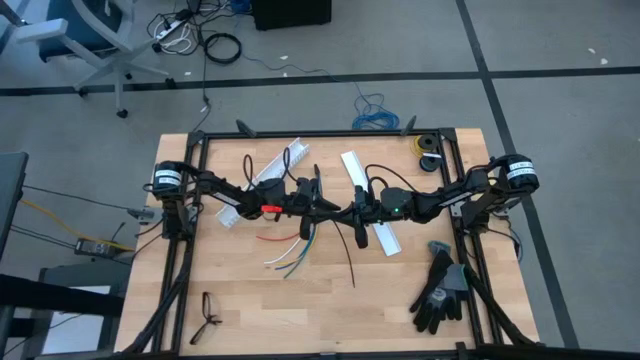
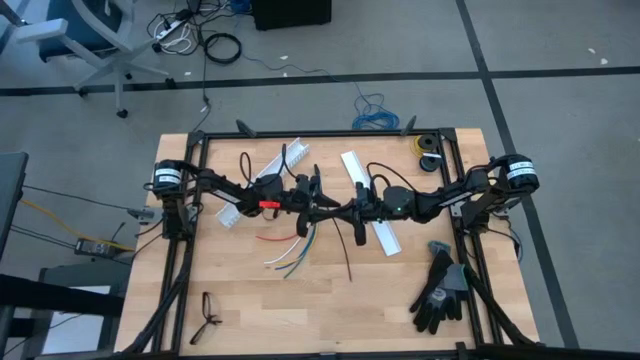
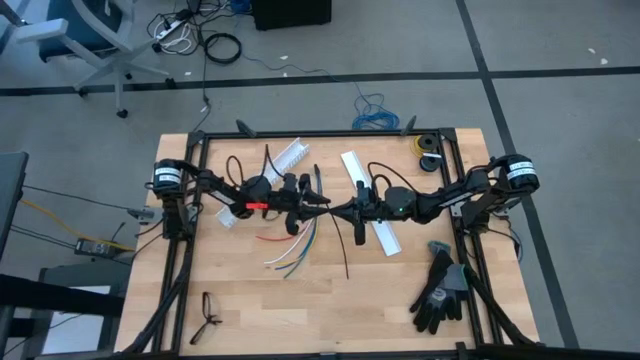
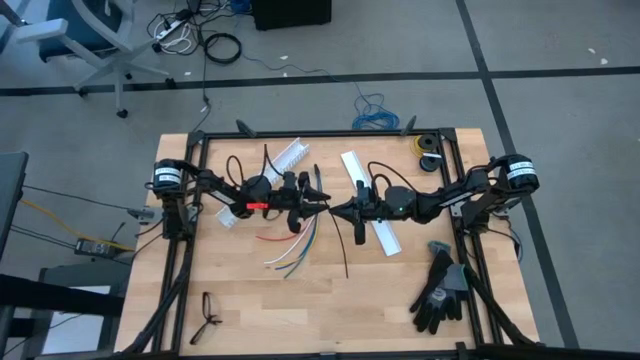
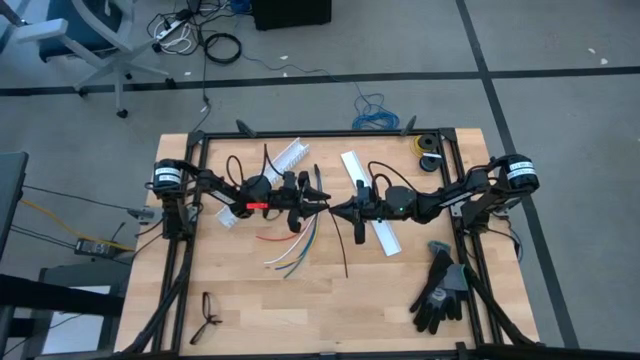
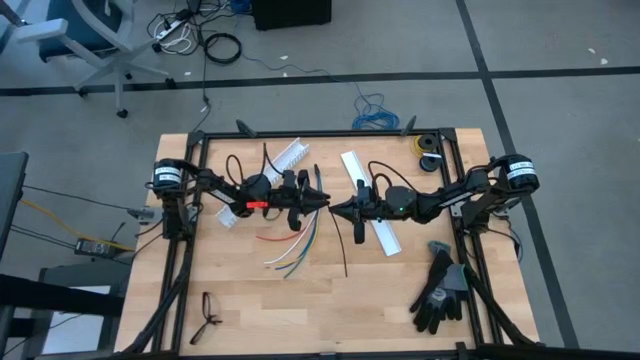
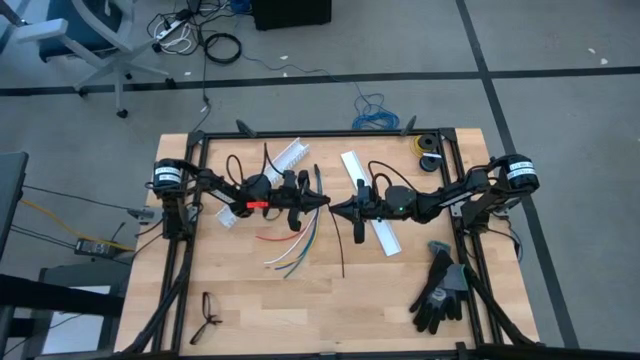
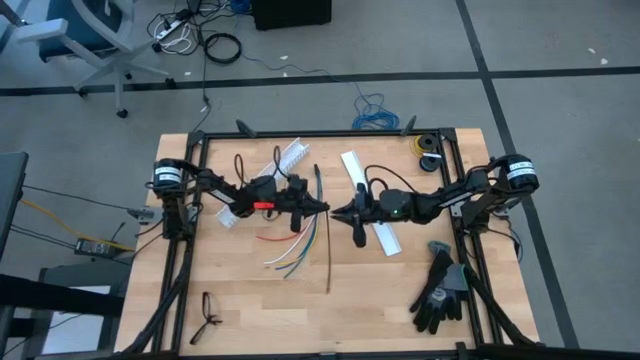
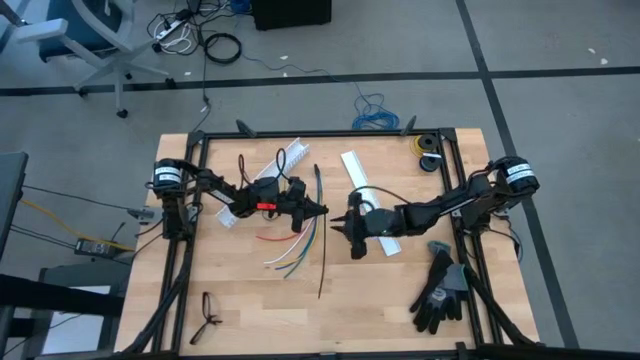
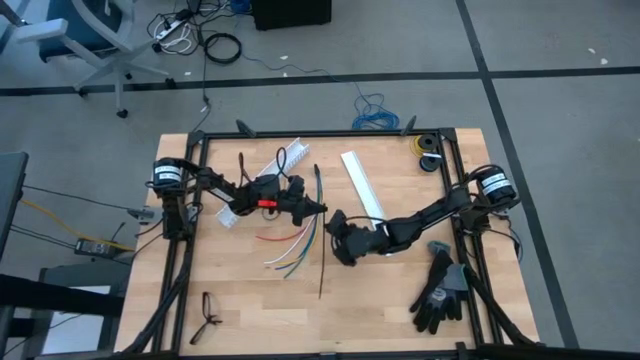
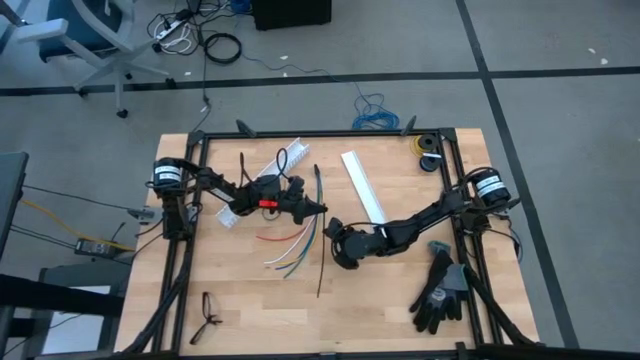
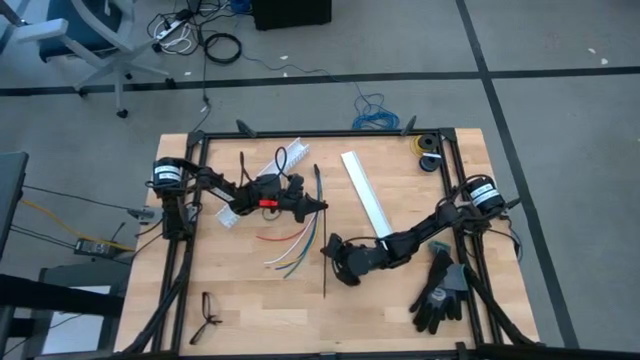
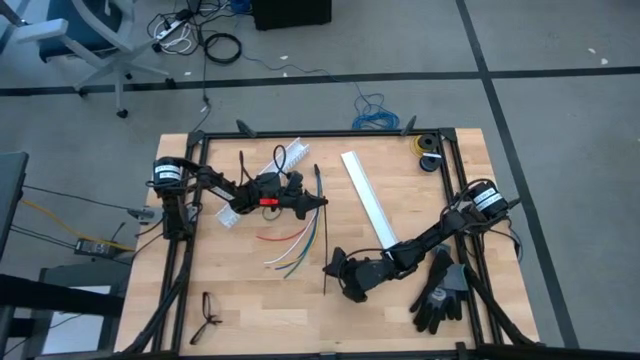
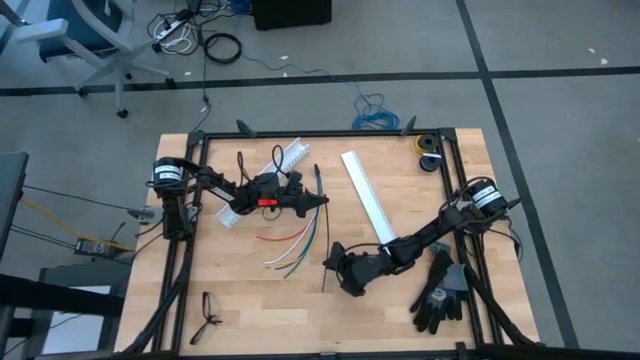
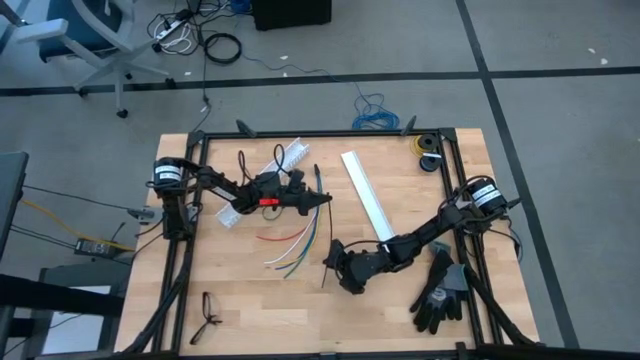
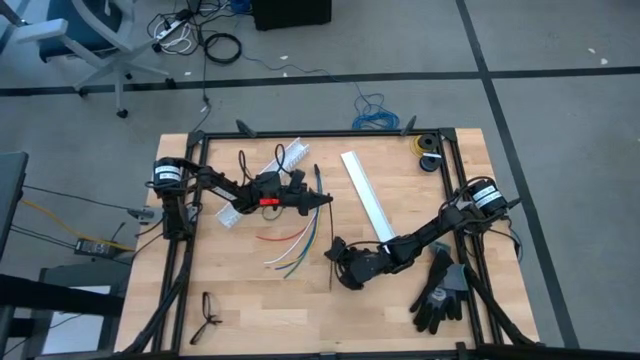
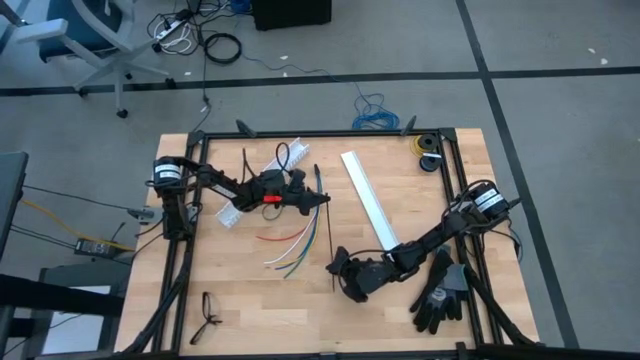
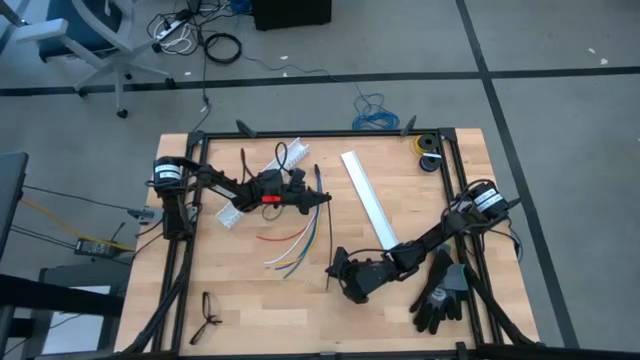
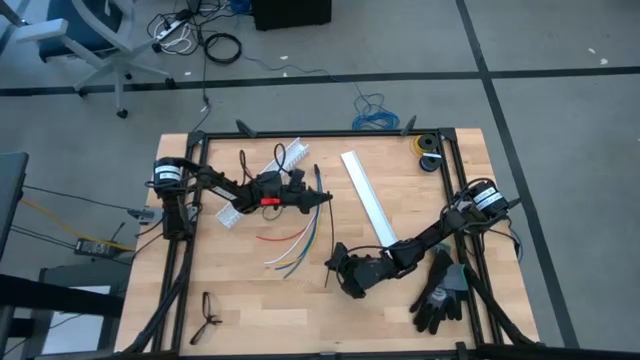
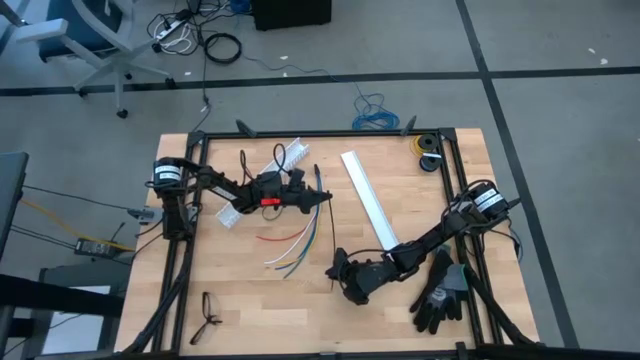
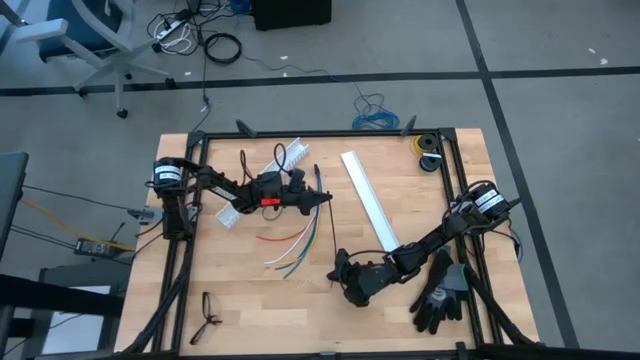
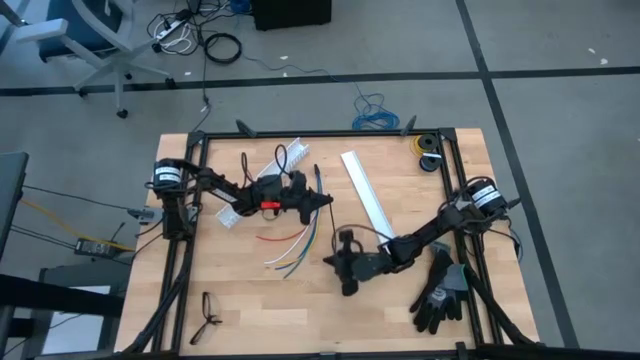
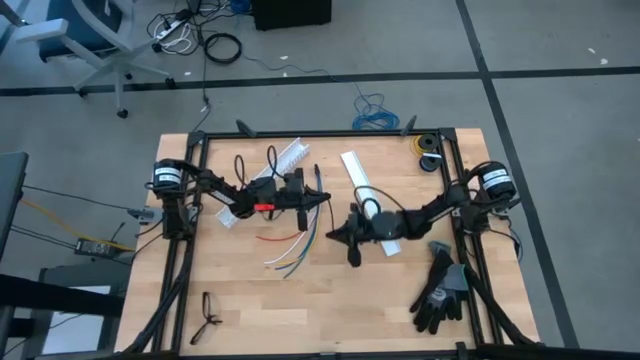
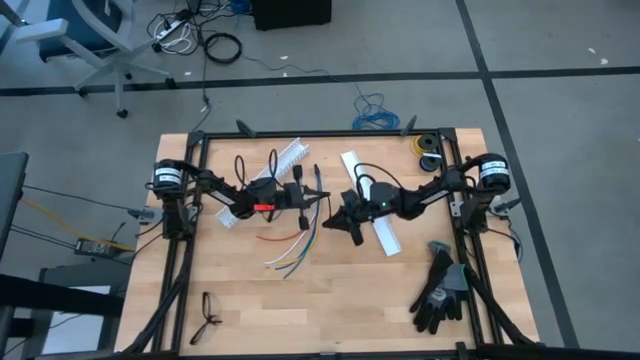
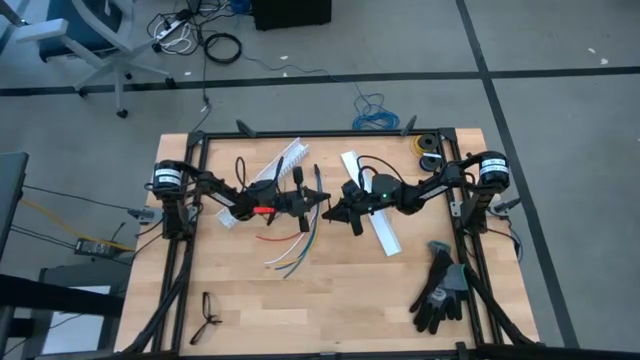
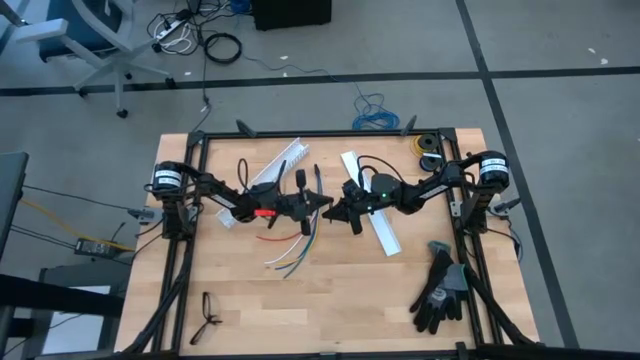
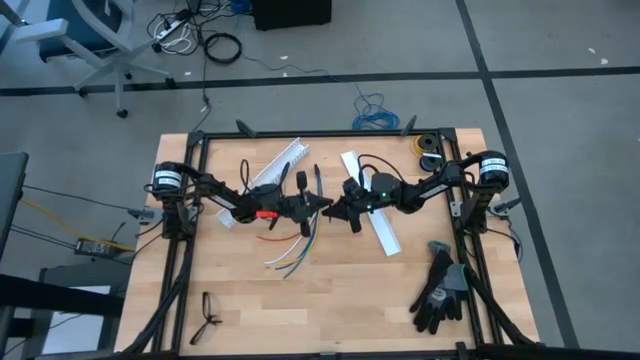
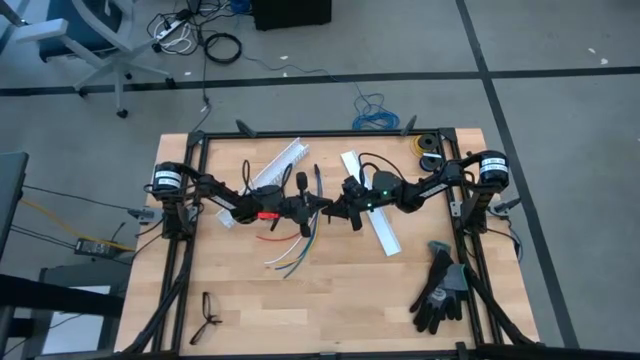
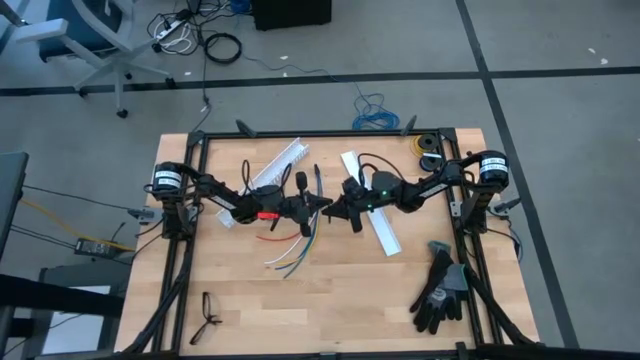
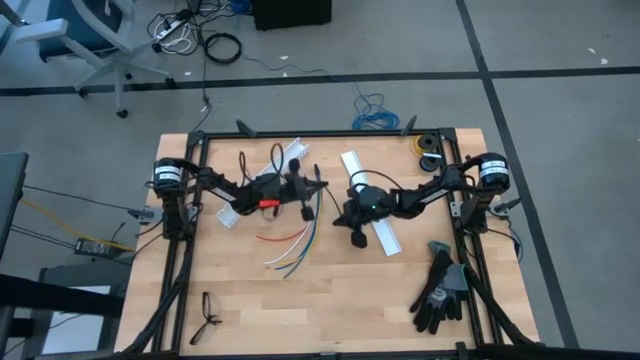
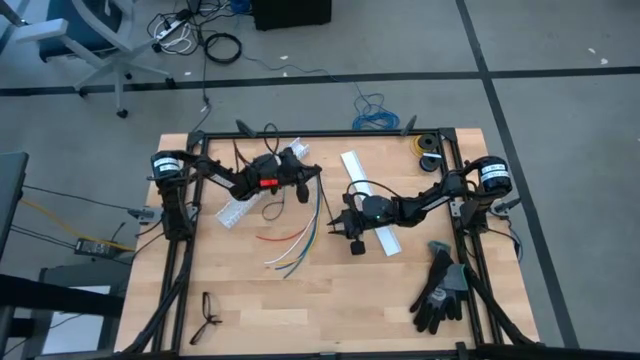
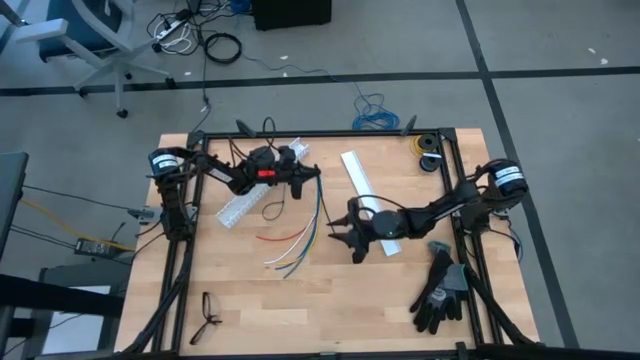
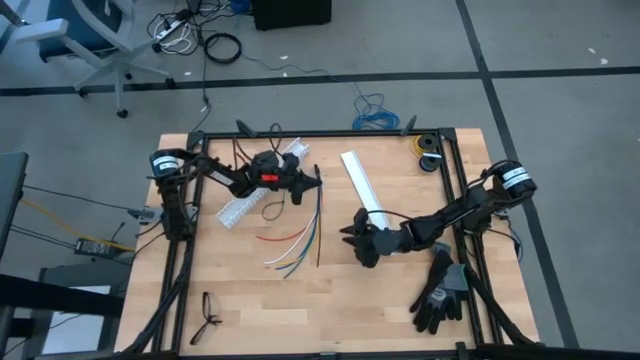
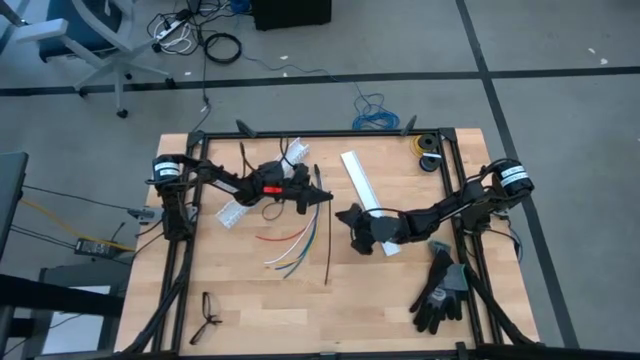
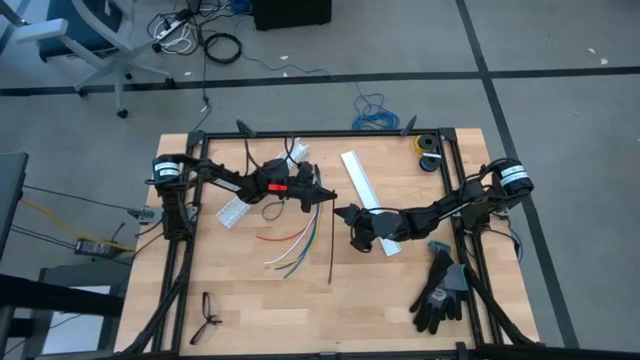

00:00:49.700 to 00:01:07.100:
Task: Ziptie cables
Prepare the black zip tie to wrap the cable wires
